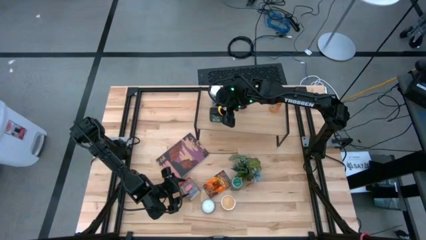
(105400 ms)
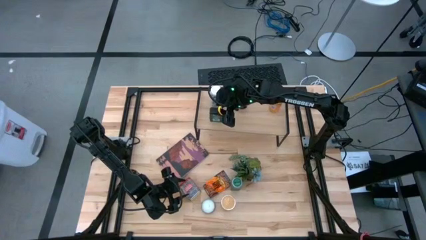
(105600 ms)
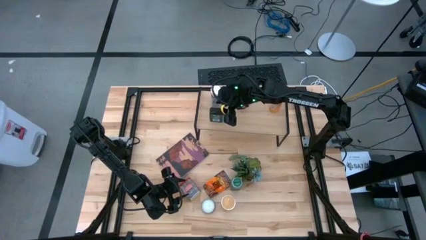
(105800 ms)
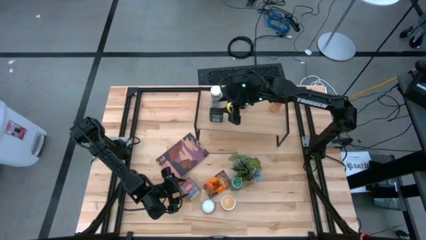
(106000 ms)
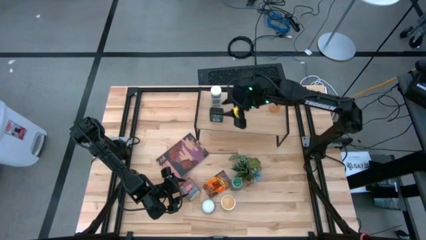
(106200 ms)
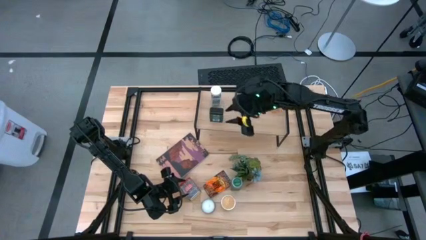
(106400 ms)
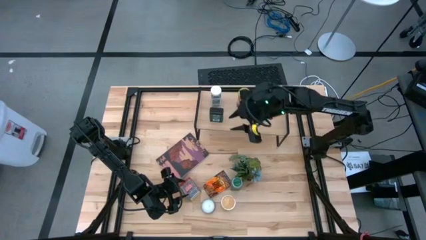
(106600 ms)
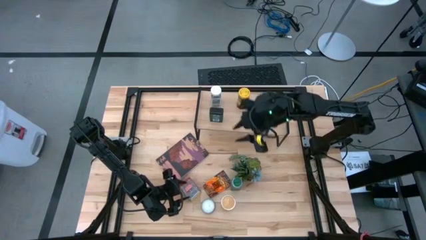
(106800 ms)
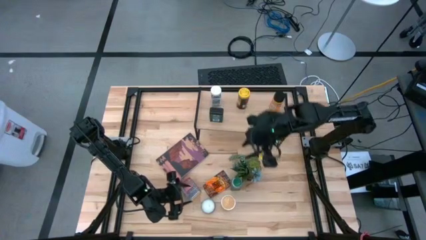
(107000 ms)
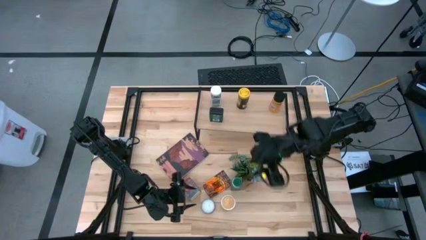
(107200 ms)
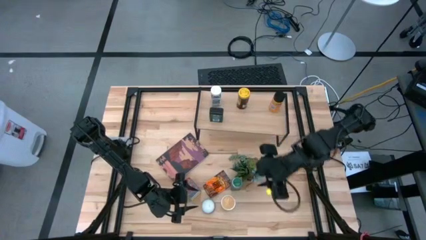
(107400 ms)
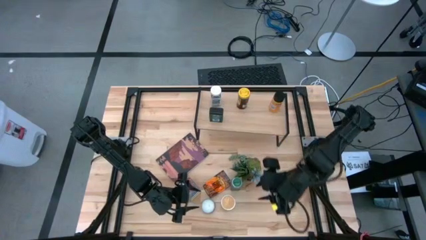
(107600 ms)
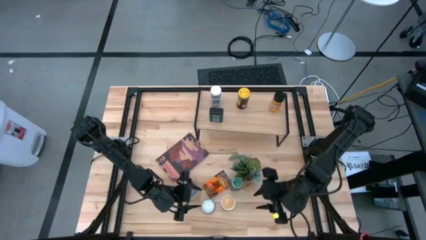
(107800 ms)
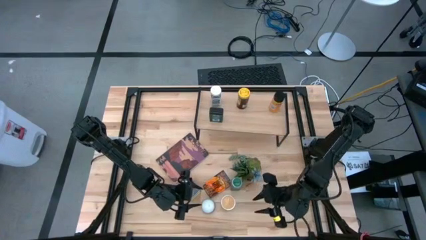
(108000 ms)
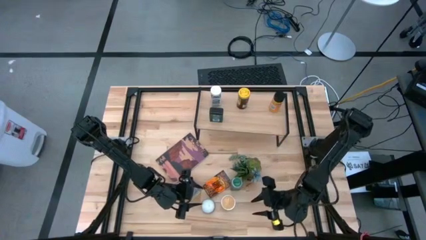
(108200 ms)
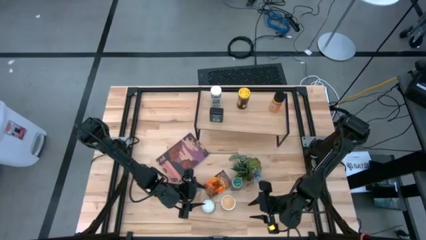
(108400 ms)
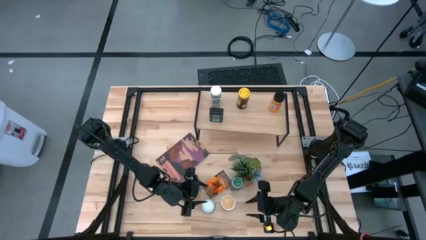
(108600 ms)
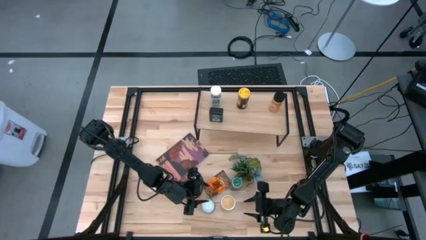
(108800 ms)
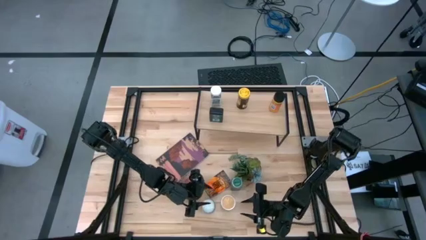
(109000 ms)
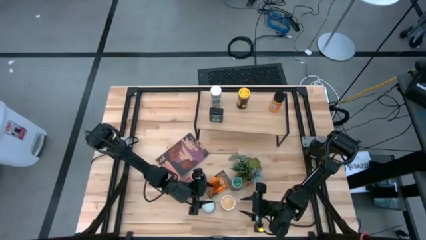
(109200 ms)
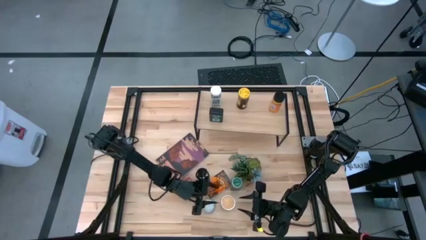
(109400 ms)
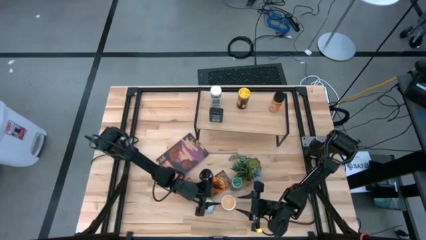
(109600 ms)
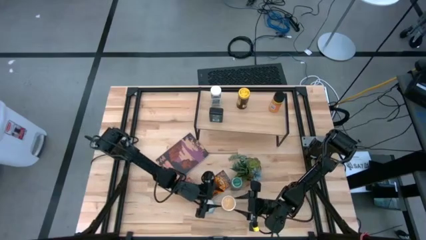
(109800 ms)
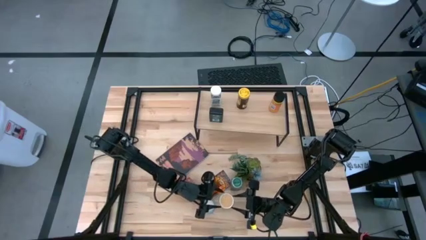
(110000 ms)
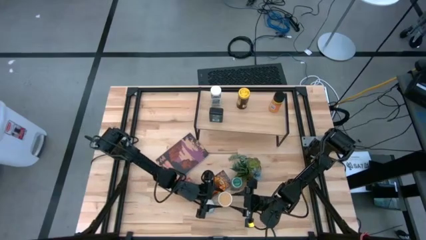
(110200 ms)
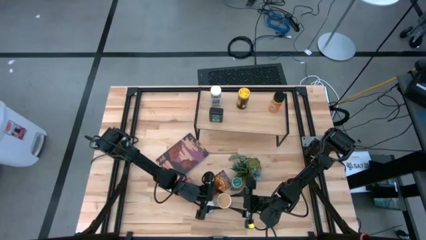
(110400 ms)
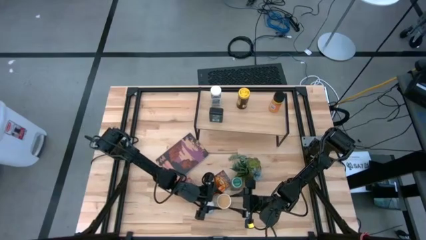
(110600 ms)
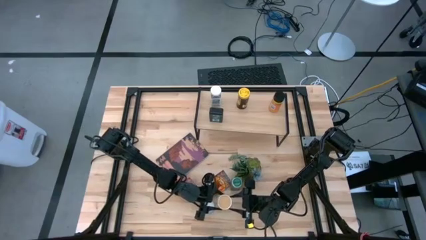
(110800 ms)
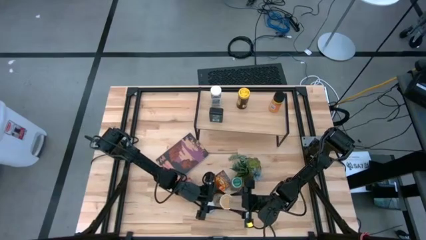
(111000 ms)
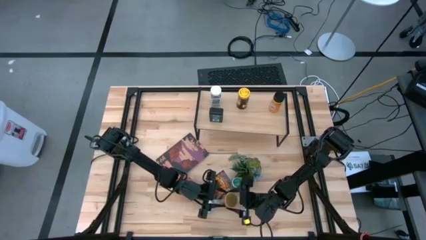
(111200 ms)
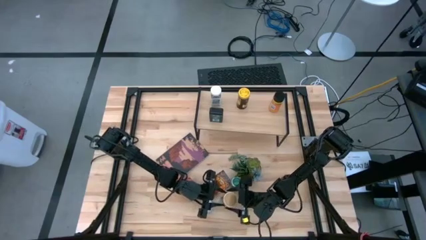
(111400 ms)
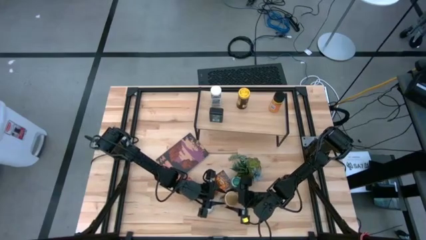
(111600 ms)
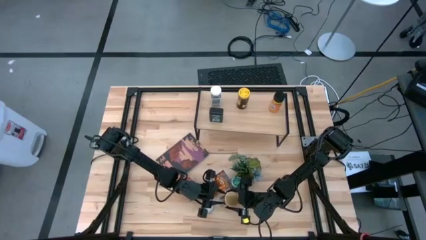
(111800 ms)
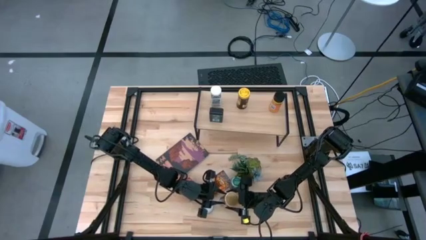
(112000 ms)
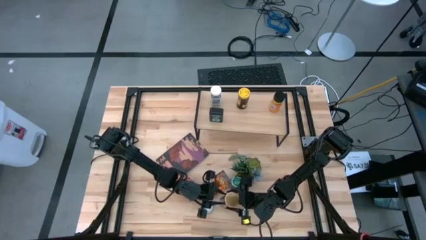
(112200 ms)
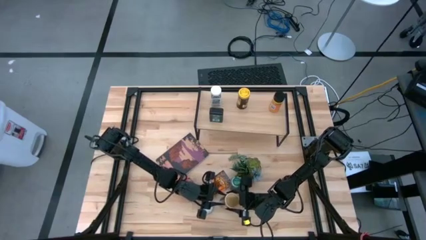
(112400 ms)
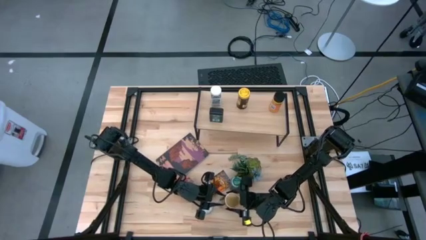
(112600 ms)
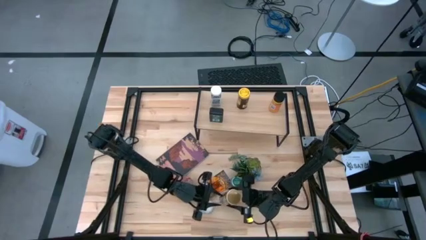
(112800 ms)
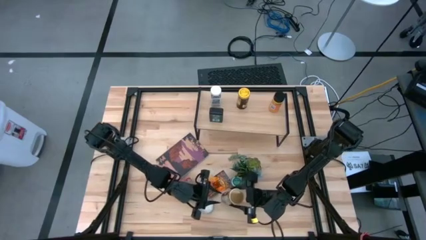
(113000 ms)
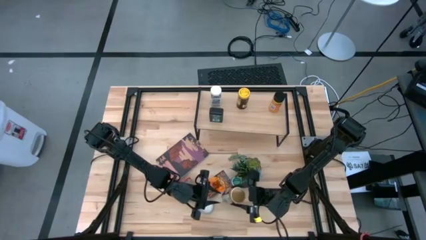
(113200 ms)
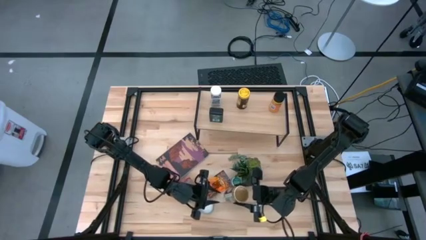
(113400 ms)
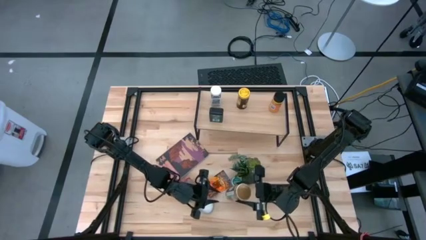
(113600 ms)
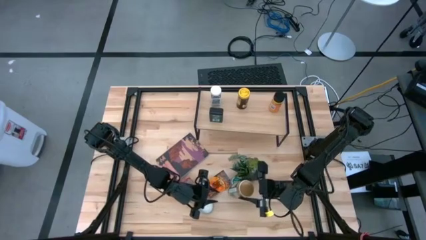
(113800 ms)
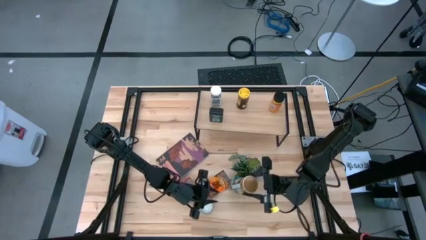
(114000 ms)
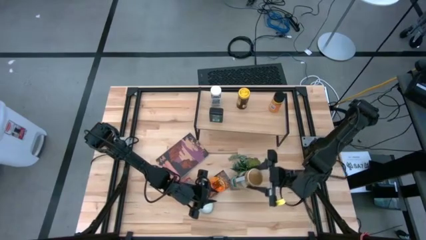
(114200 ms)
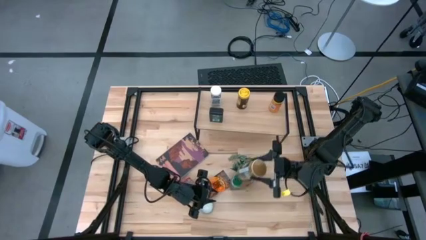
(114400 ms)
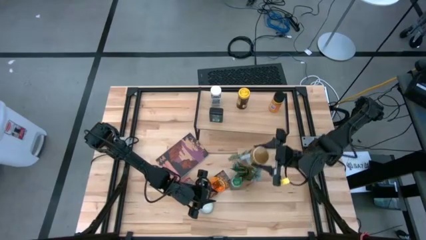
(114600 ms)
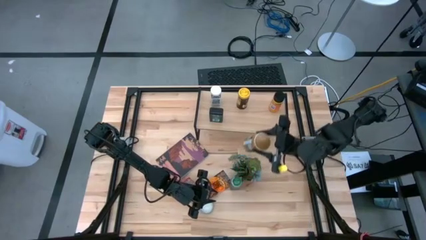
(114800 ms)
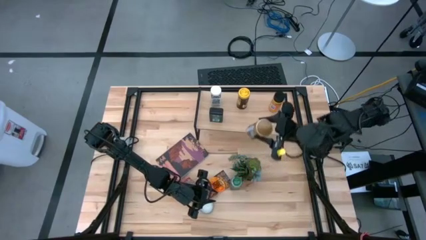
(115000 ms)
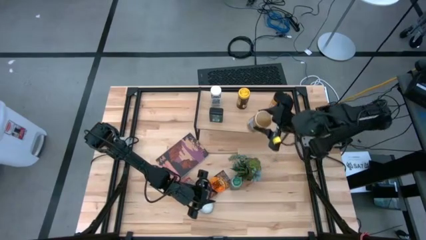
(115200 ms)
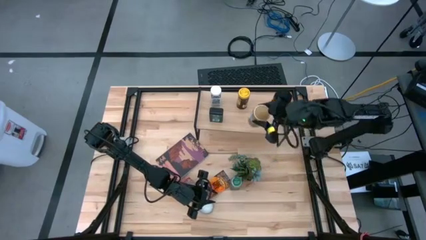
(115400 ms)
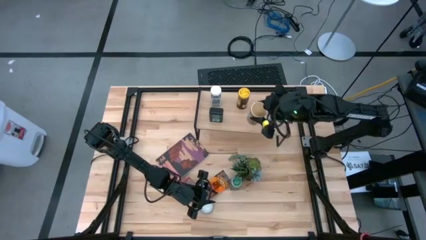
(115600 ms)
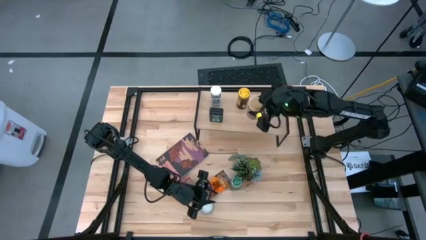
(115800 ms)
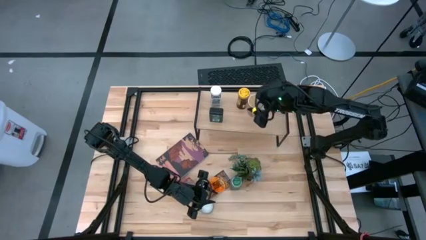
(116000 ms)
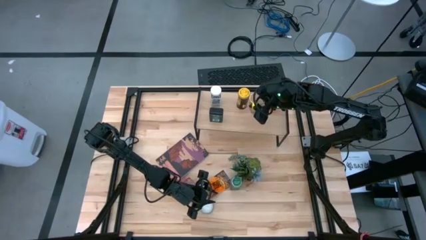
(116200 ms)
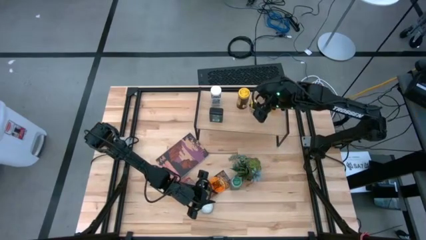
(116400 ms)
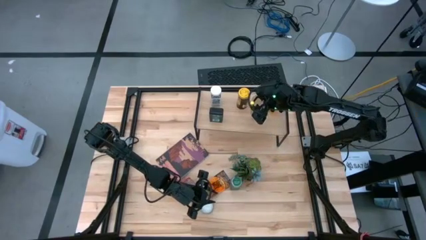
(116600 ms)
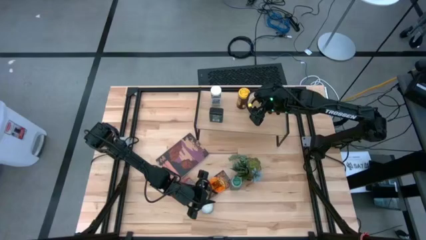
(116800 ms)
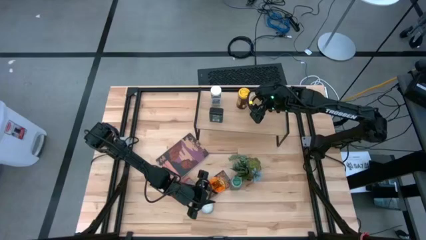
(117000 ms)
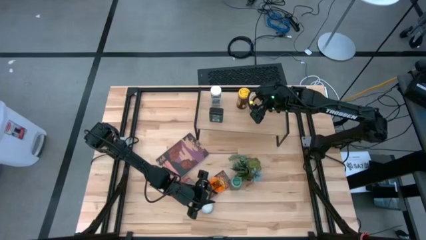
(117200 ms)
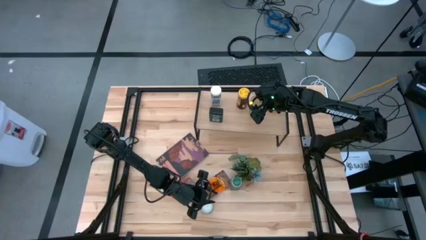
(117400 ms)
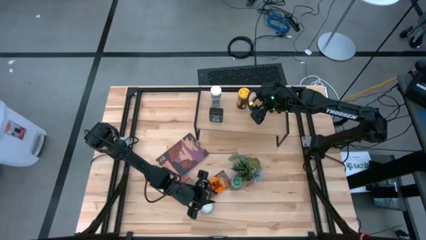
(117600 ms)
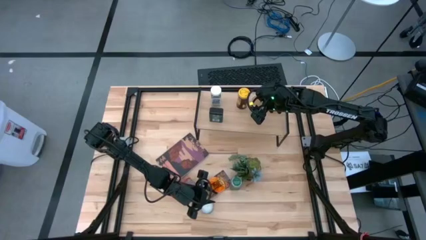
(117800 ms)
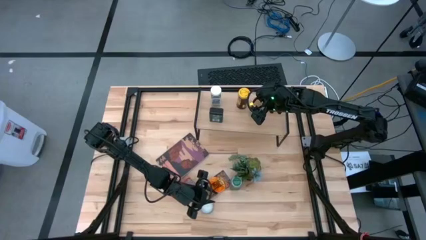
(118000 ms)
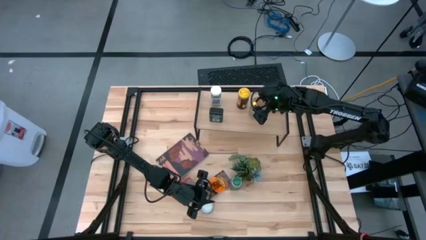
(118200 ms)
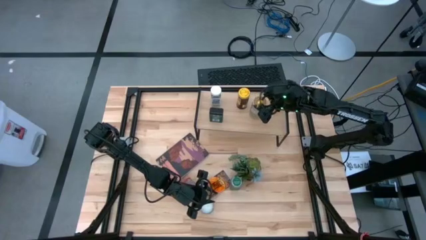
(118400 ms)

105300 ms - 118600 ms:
Task: Shelf spices
Put the gold seasoning bottle on the shelf

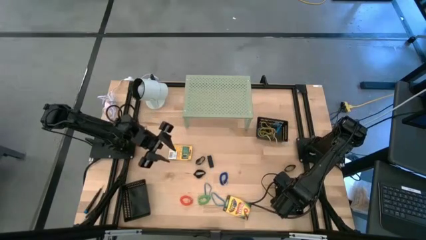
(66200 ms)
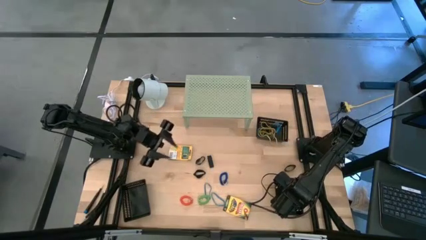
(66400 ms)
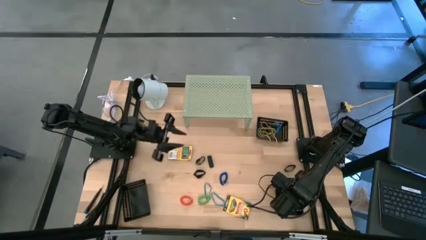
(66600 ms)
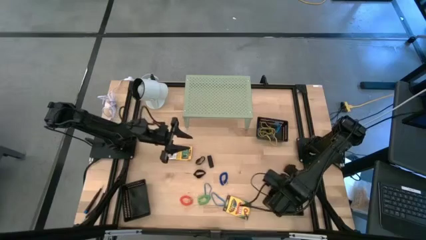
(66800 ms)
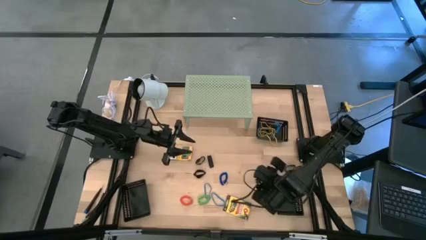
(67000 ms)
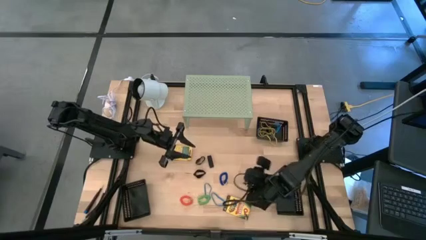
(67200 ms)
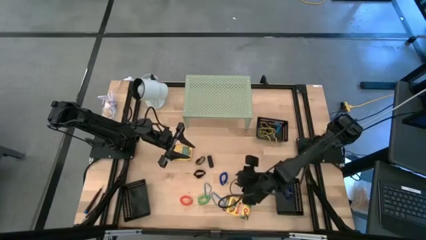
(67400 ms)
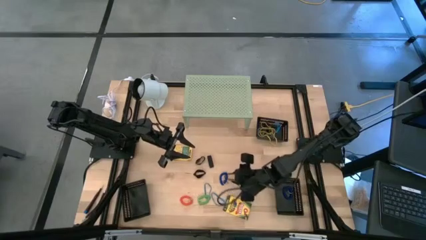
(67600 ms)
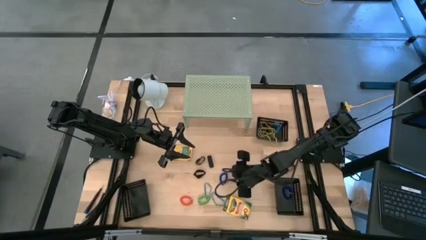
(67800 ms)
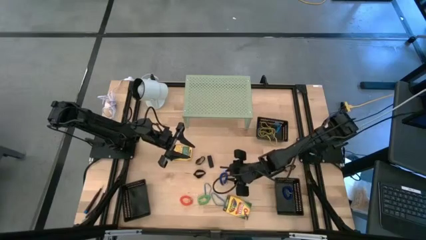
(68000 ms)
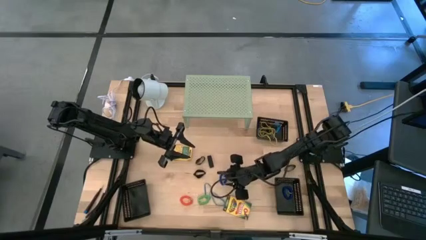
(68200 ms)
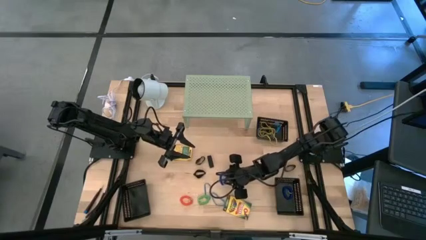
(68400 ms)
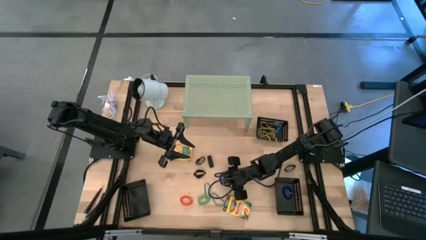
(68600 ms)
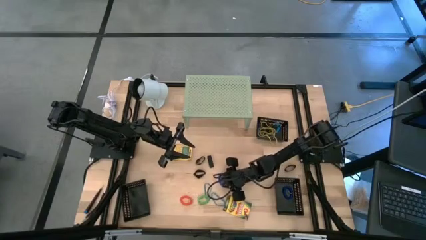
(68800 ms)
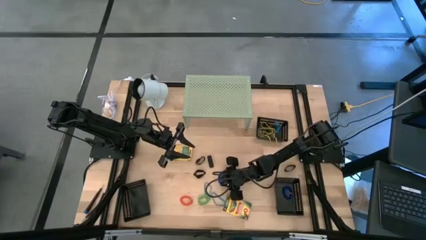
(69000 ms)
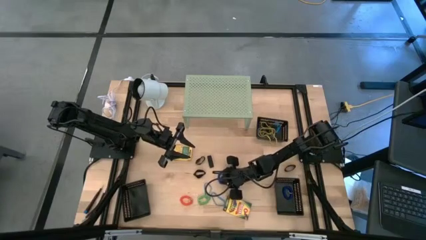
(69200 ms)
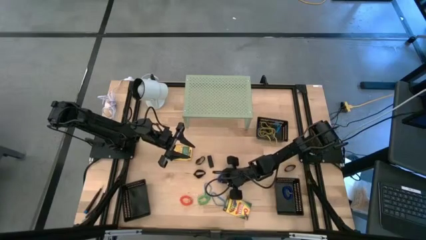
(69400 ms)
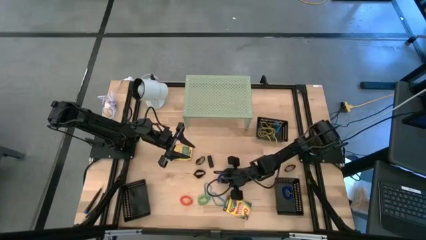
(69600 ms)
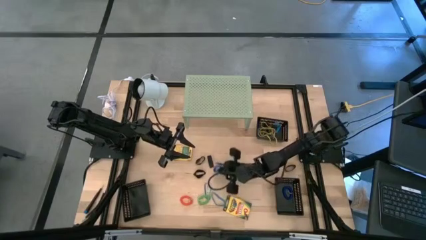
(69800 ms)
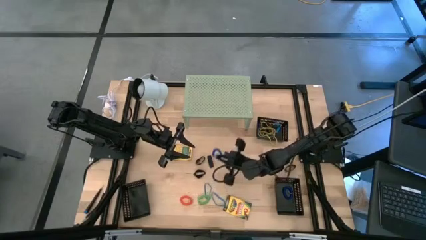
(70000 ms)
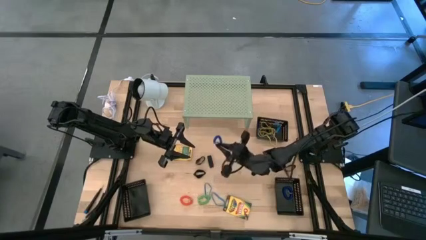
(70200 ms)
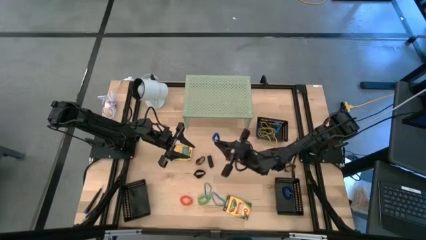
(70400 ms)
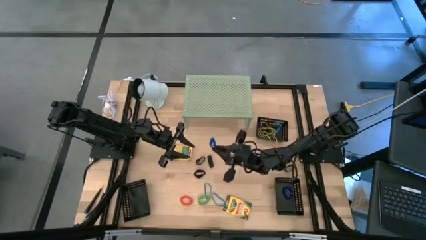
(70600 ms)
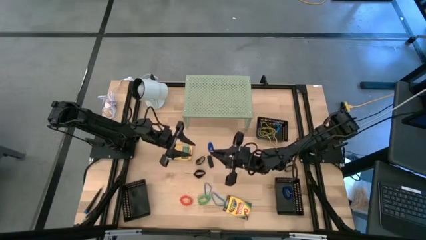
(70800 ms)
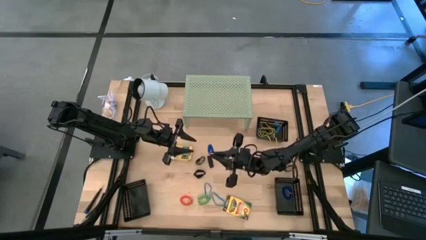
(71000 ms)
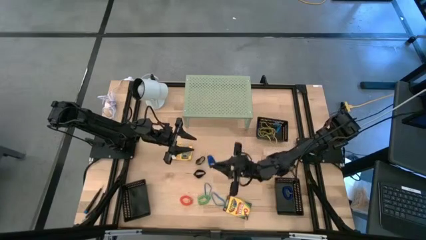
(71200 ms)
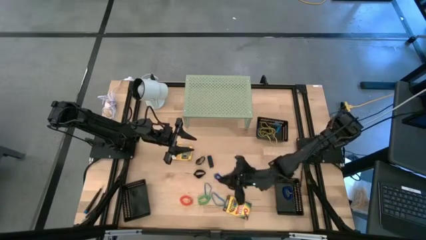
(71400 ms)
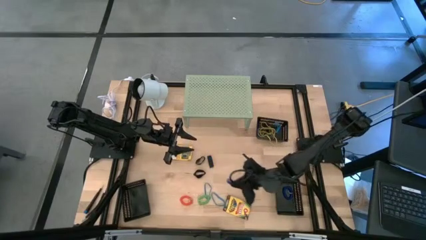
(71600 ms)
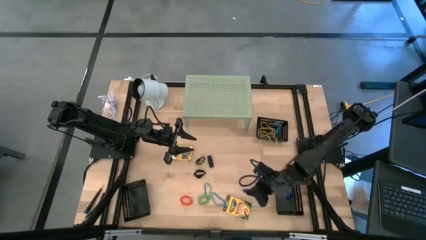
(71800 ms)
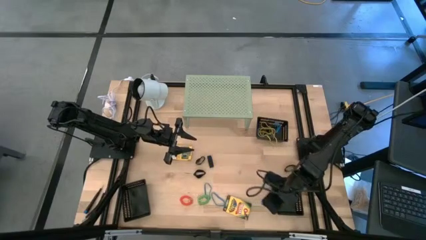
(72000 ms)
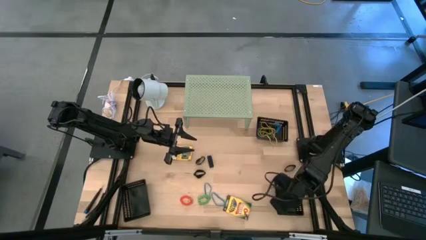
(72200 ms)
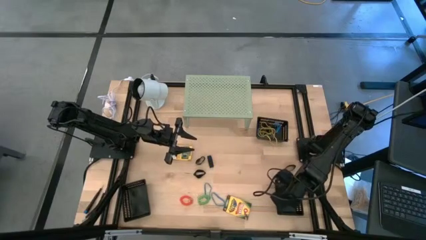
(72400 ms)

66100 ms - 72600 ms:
Task: Pick & Place Office Desk Supplies
Put the blue spring keychain into the bottom right black bin
